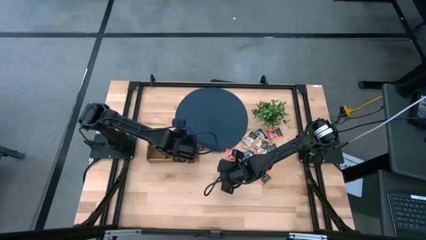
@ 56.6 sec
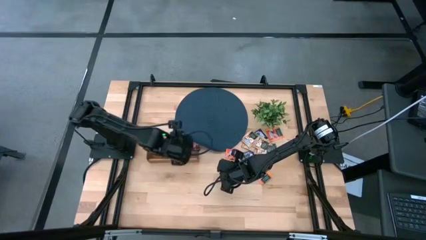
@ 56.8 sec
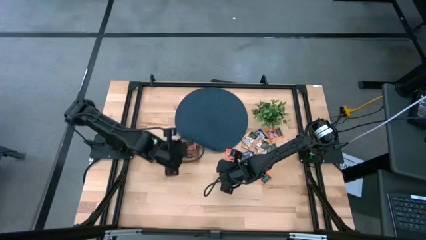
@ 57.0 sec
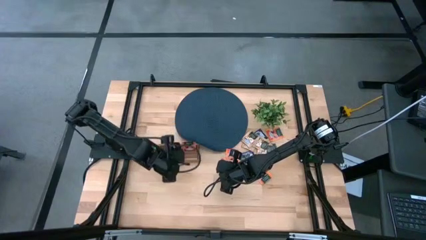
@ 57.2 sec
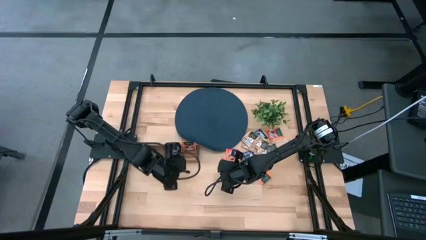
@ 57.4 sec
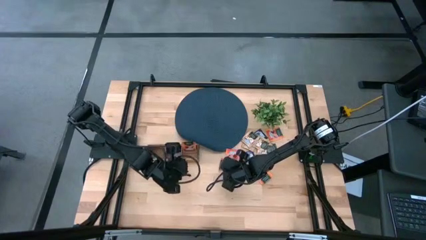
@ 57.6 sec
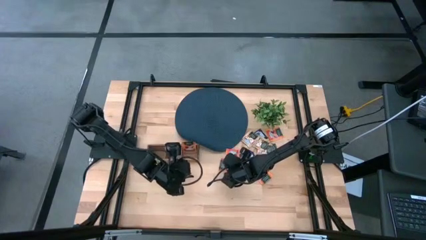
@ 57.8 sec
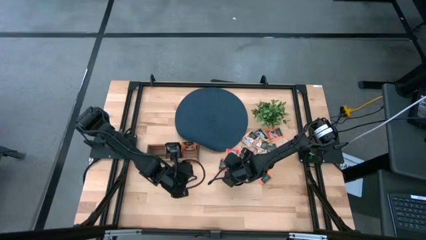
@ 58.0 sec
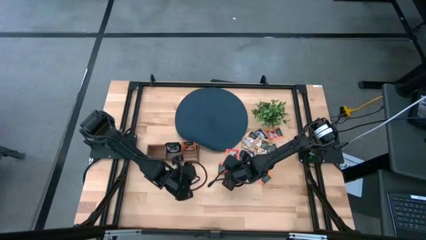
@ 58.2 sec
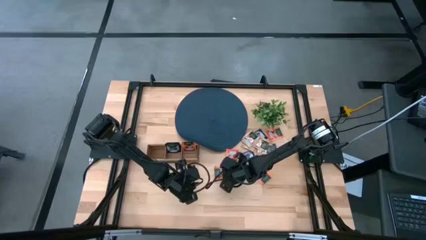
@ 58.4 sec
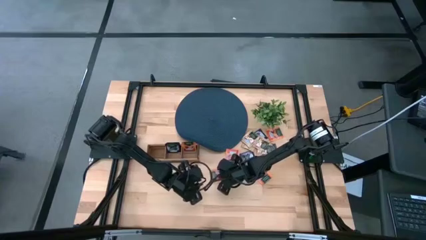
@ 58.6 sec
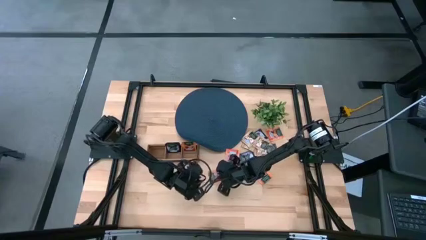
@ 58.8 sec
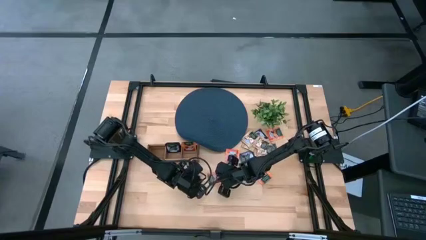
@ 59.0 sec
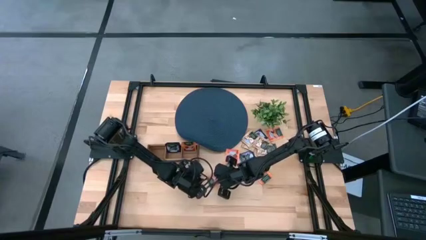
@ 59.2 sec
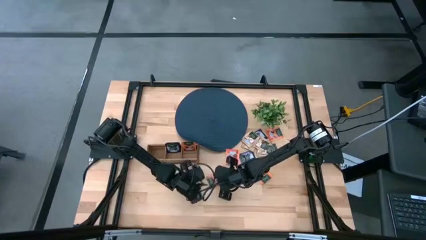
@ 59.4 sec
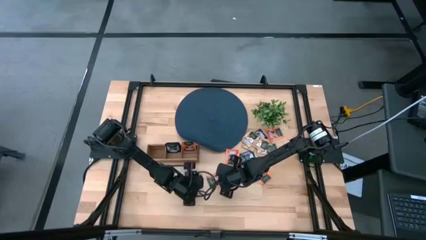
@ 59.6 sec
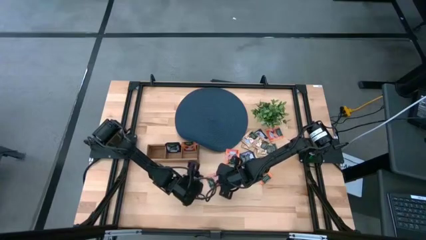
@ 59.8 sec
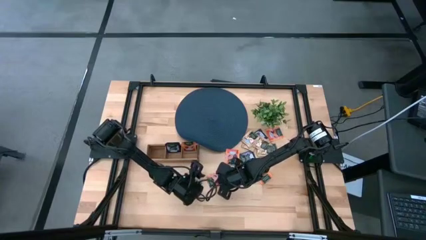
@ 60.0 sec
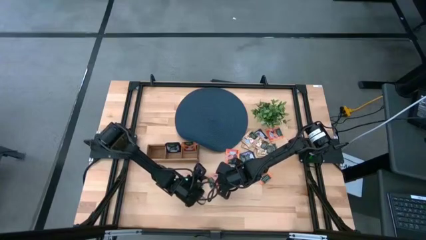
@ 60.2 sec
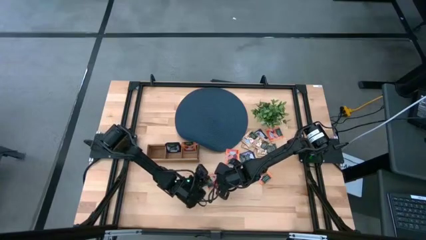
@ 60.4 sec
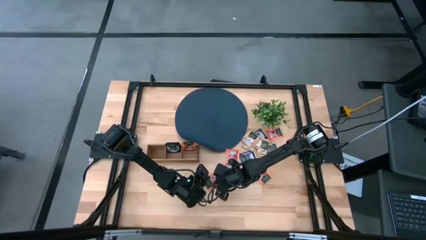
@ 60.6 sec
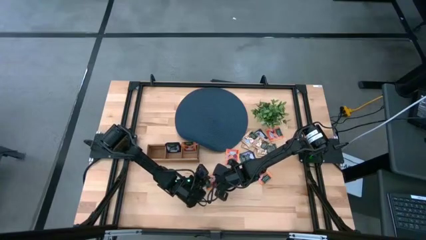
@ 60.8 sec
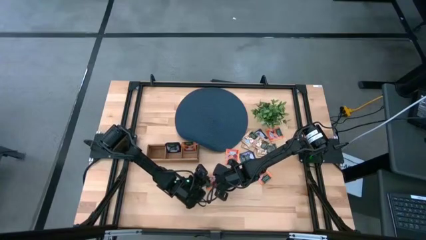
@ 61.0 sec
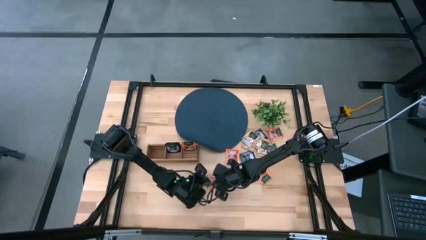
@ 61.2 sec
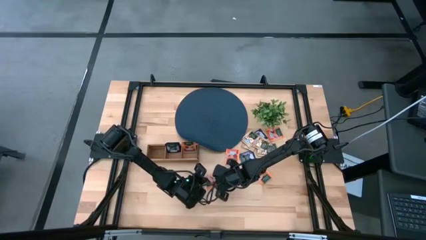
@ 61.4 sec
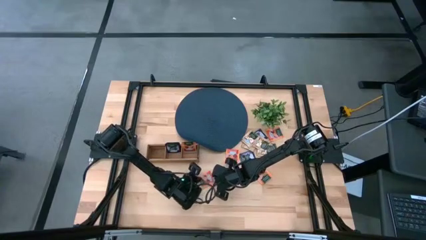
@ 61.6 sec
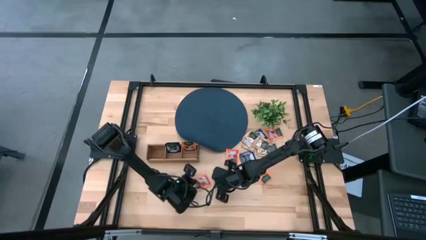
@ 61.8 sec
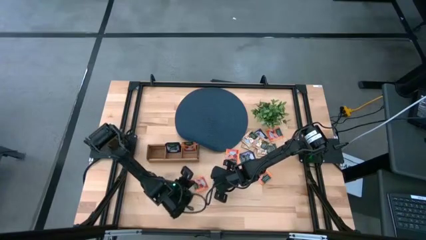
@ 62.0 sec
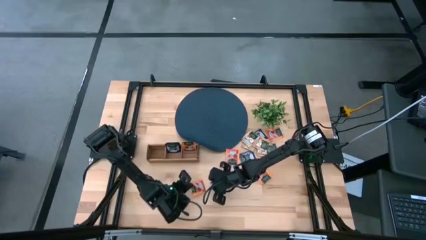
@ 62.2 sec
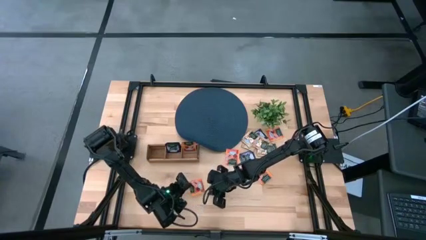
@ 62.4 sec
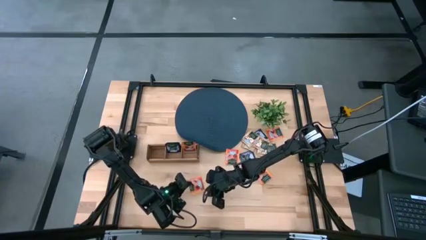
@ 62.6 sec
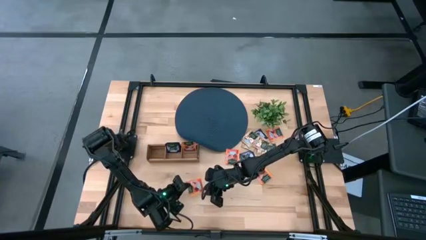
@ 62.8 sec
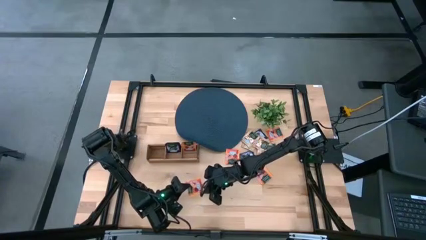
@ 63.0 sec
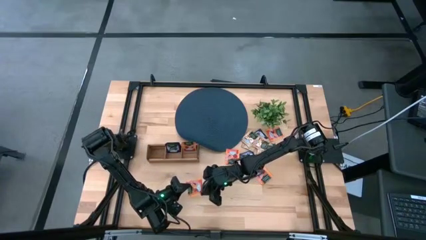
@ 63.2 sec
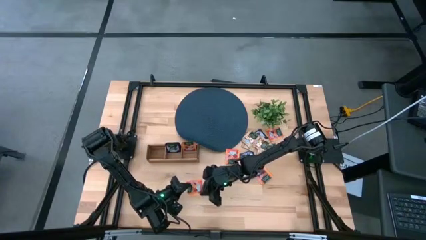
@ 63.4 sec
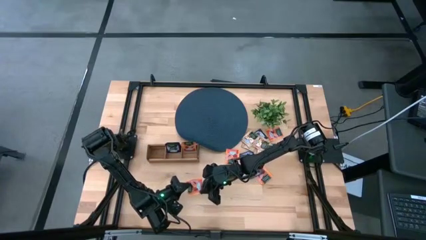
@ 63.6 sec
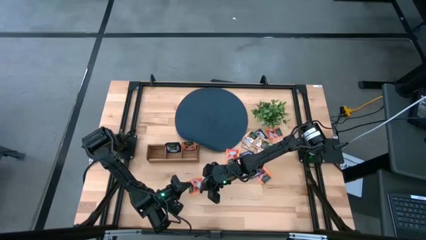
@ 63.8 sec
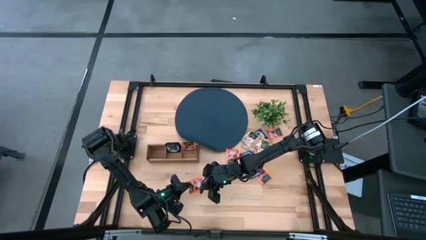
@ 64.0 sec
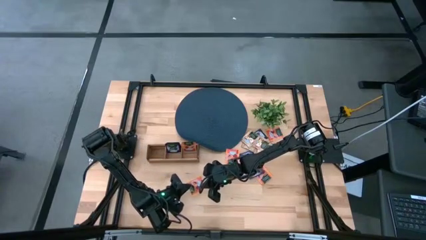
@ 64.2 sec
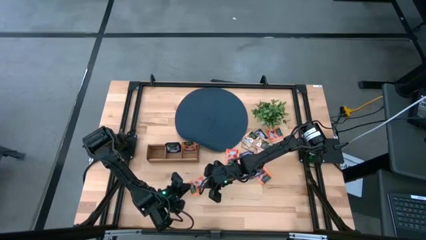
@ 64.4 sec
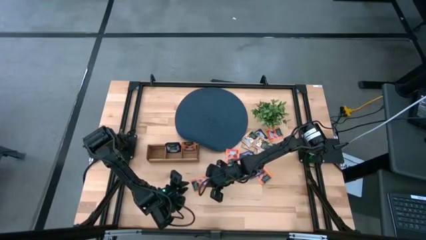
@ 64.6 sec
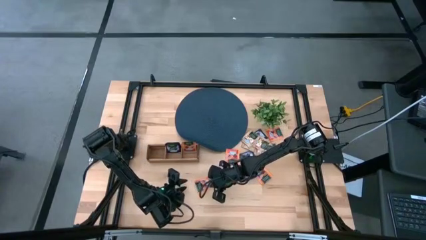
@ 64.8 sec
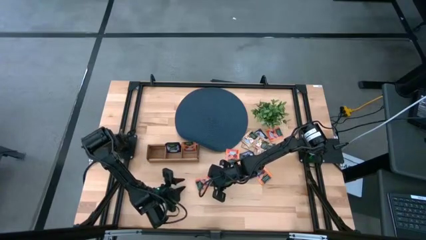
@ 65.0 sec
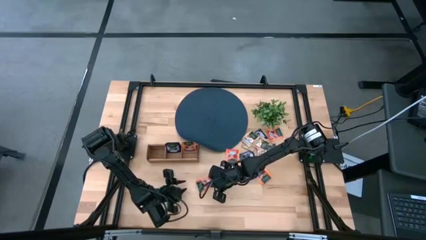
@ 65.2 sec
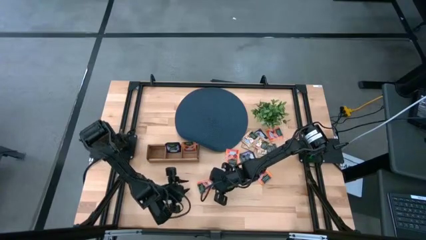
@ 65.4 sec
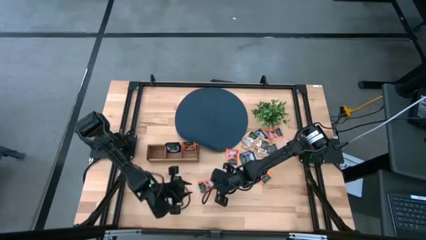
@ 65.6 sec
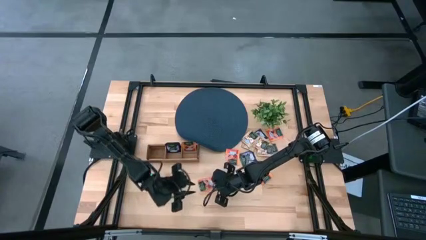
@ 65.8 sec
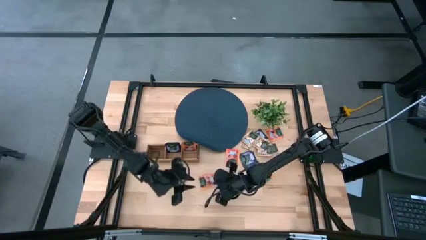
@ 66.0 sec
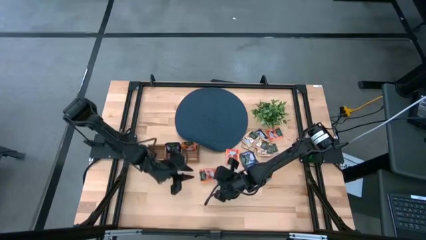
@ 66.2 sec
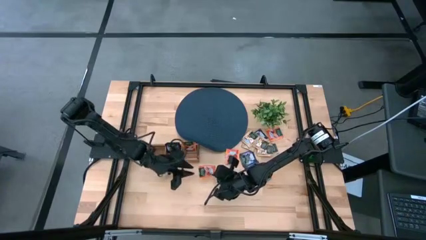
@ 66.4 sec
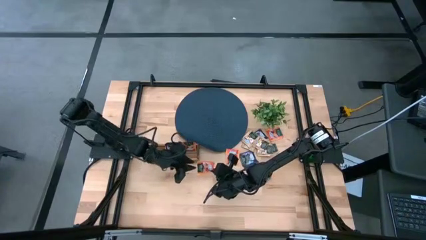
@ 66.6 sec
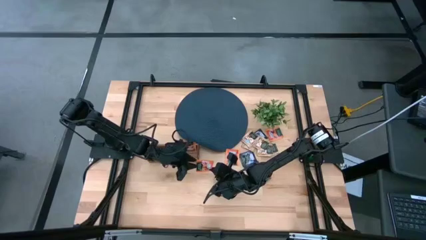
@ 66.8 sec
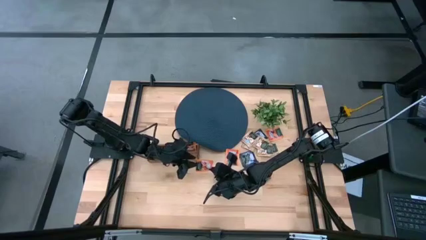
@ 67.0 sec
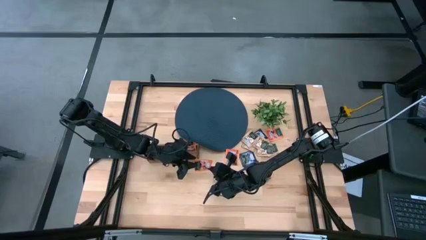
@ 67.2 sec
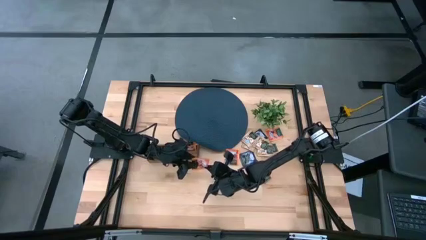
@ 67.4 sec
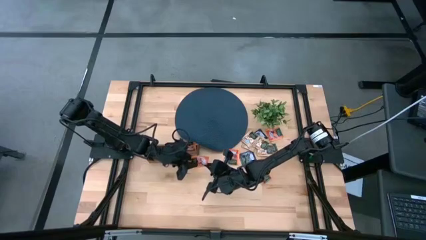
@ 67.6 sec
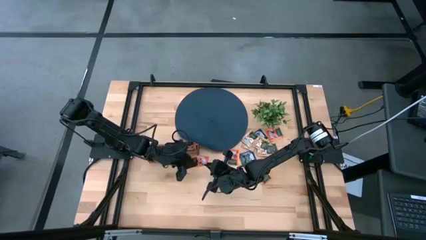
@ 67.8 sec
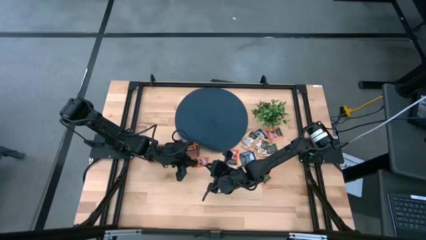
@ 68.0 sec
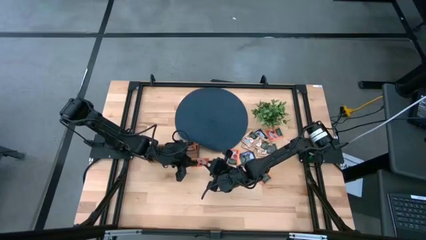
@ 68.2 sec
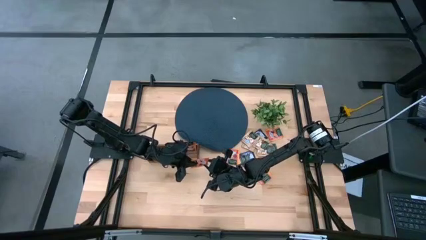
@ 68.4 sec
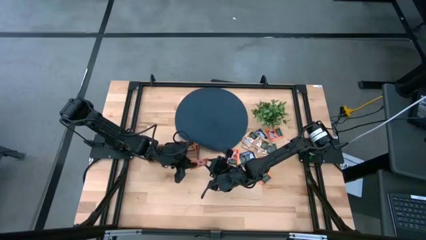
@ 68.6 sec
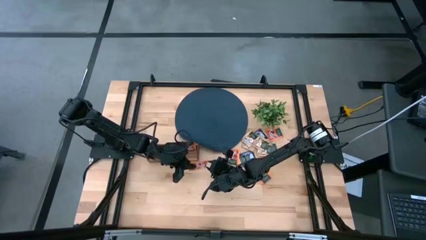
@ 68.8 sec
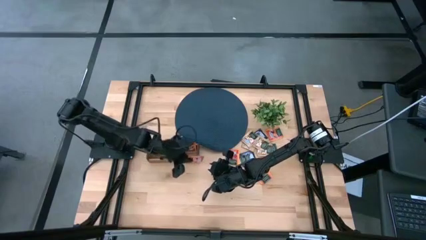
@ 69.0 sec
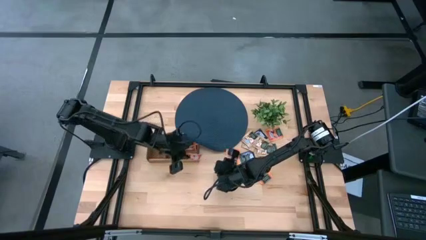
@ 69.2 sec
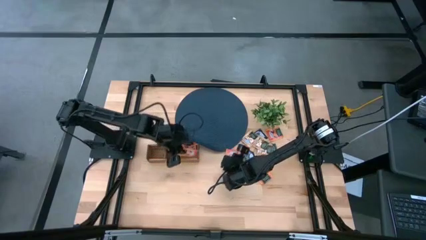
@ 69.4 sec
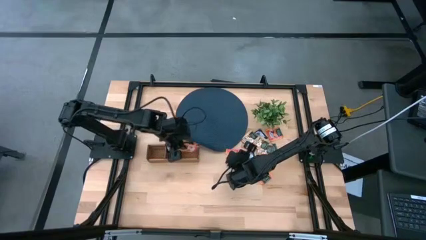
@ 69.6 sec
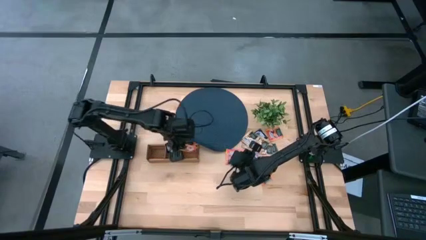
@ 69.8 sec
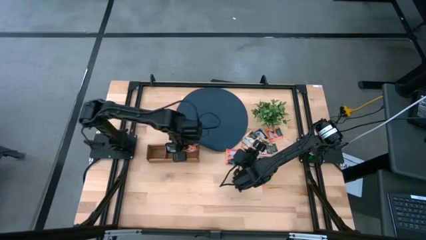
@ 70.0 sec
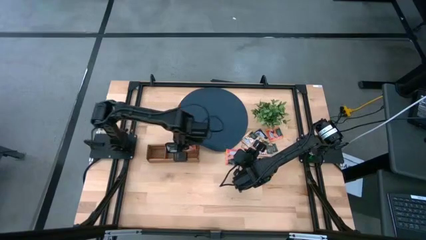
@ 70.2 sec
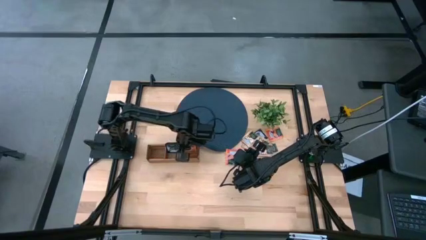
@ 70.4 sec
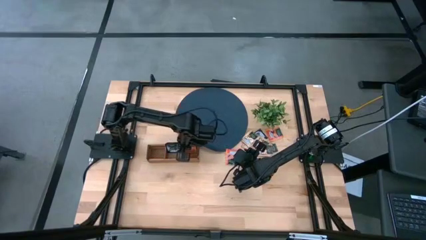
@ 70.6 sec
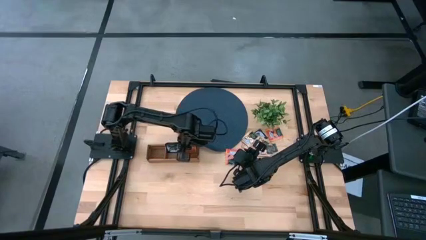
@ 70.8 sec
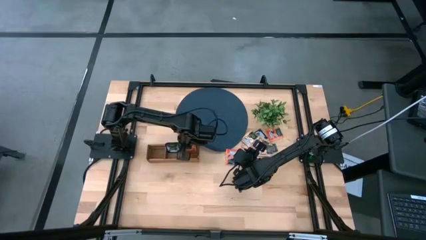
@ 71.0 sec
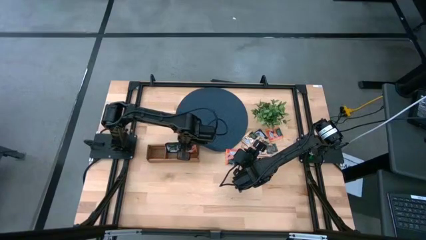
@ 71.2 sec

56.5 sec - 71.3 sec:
Task: Pick & Place Tea
Put the orange tea bag into the right section of the wooden organizer
